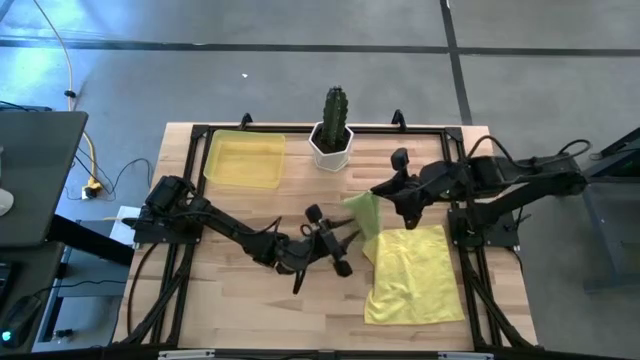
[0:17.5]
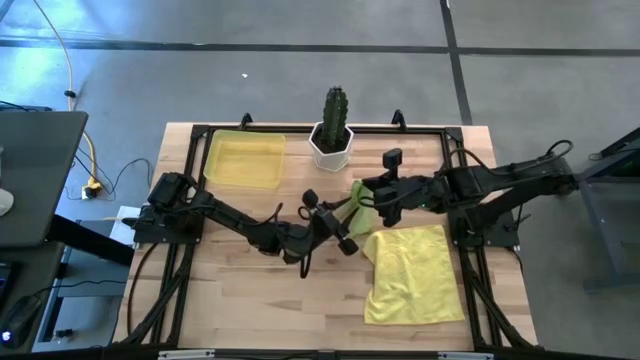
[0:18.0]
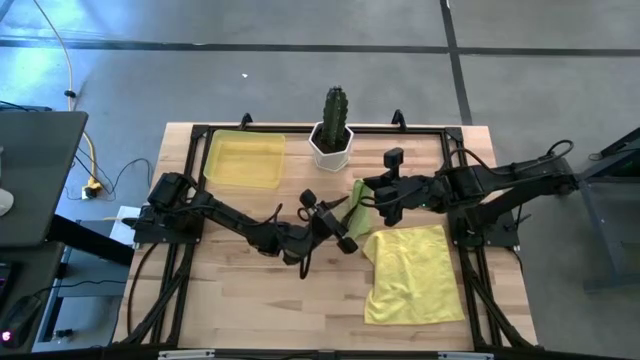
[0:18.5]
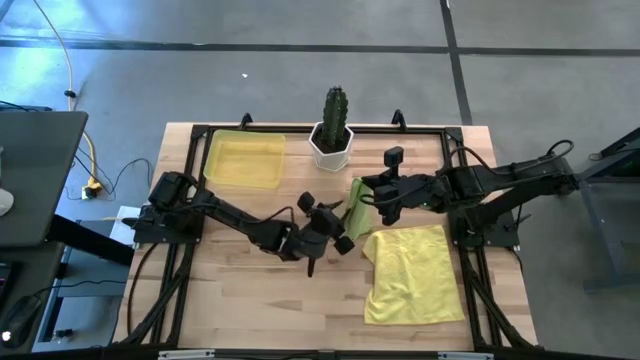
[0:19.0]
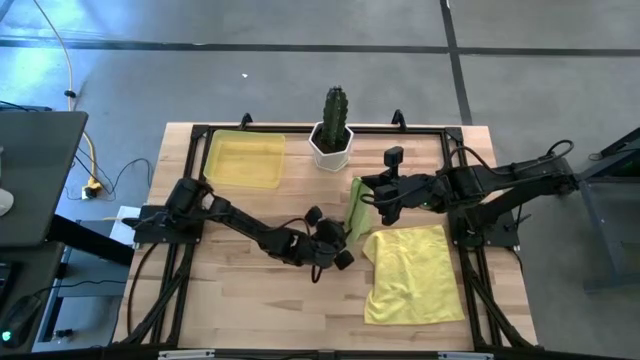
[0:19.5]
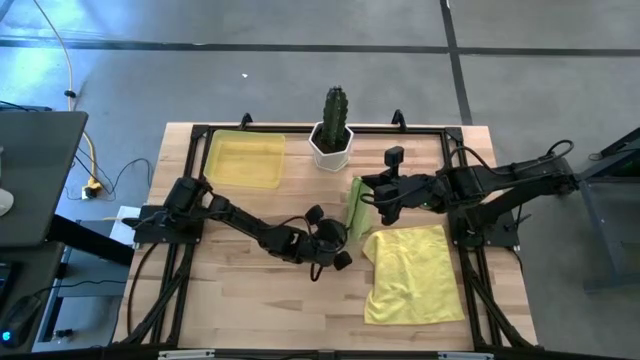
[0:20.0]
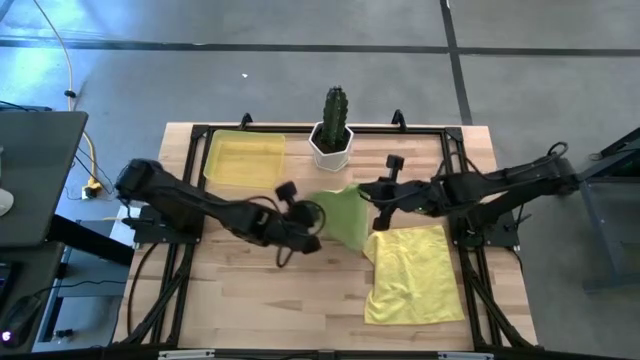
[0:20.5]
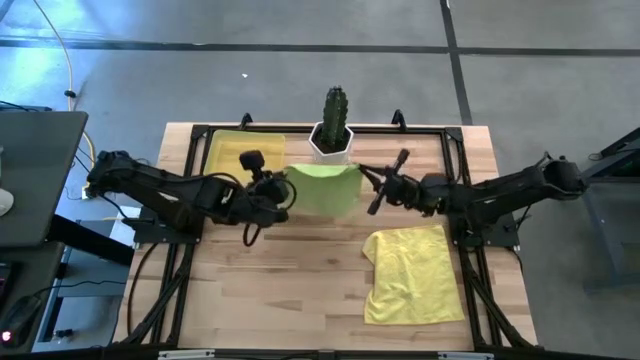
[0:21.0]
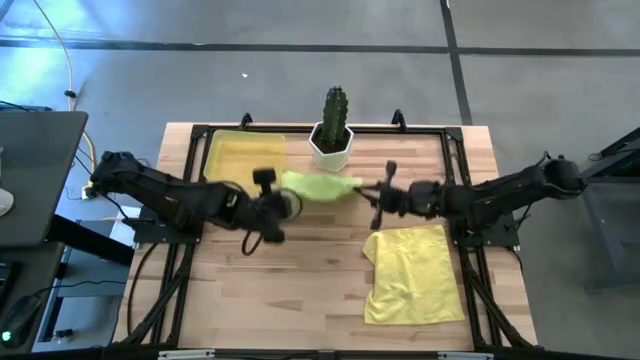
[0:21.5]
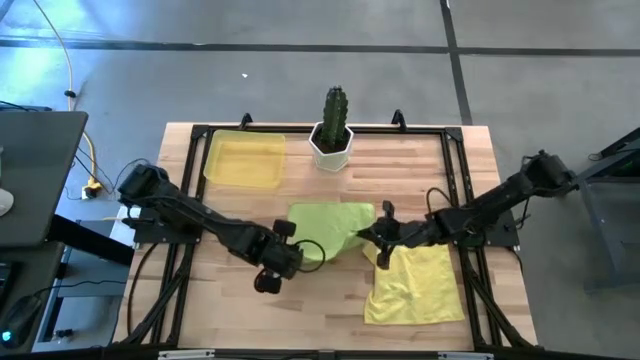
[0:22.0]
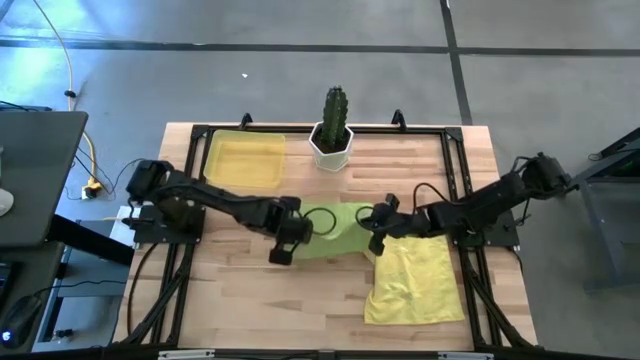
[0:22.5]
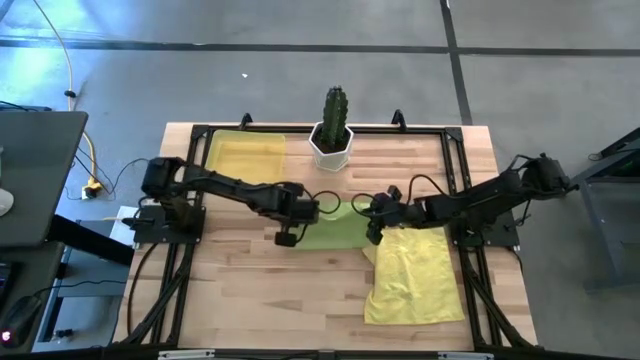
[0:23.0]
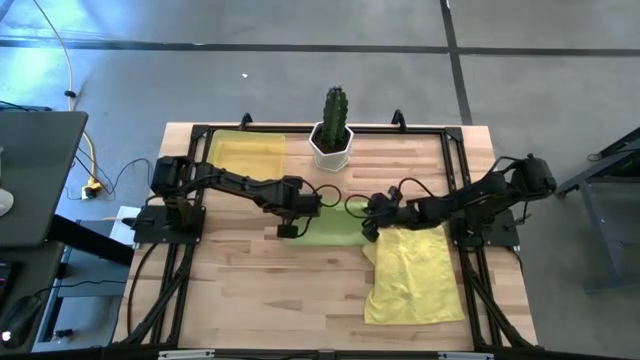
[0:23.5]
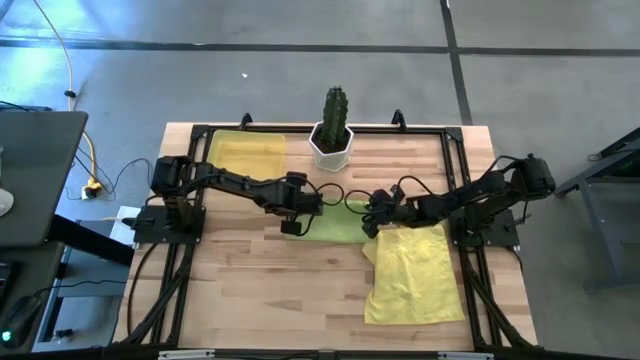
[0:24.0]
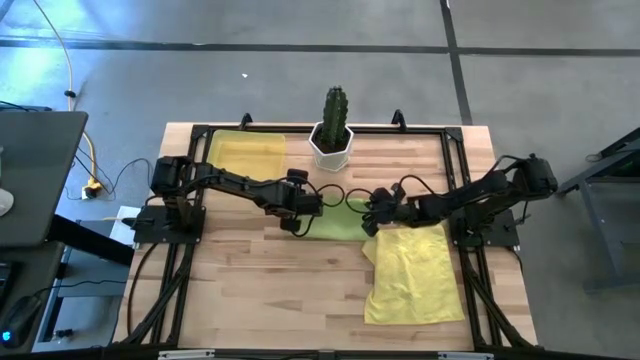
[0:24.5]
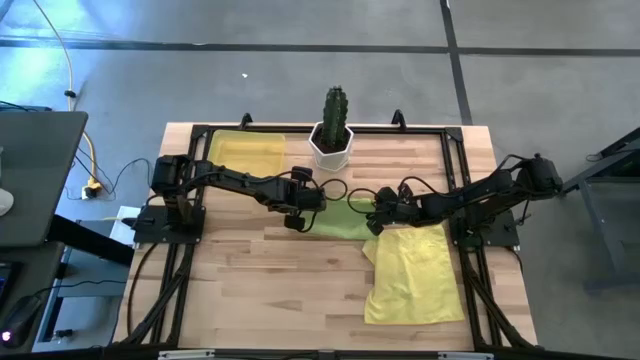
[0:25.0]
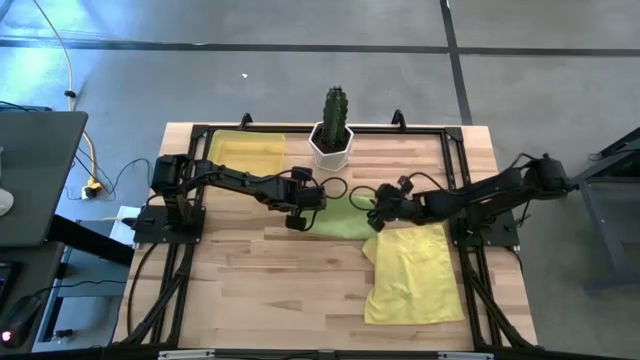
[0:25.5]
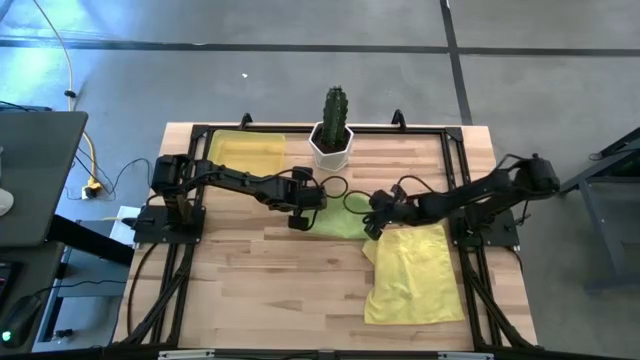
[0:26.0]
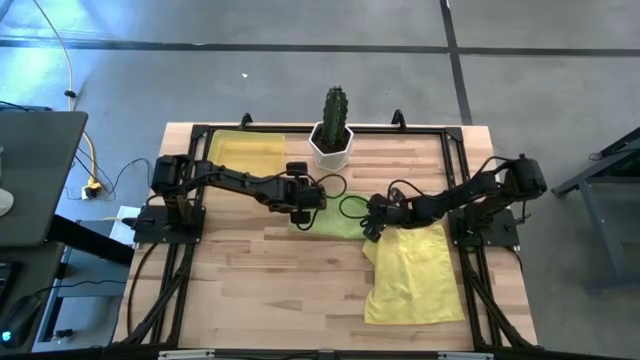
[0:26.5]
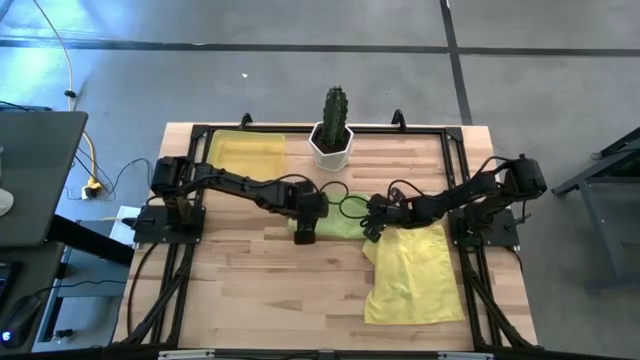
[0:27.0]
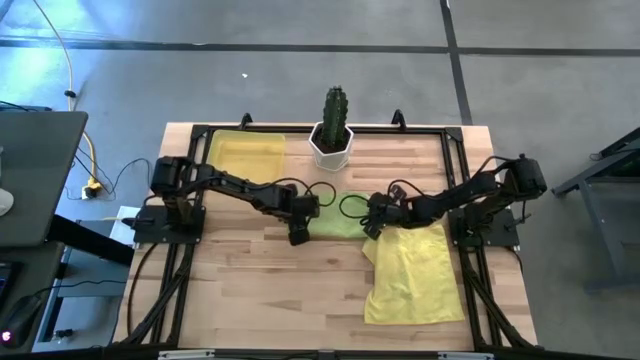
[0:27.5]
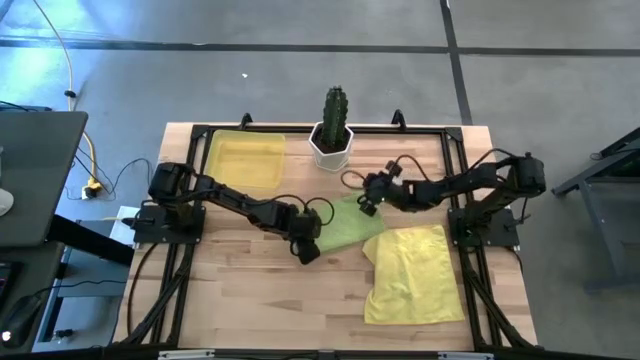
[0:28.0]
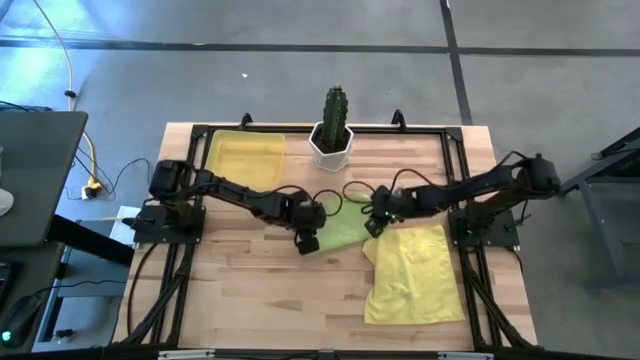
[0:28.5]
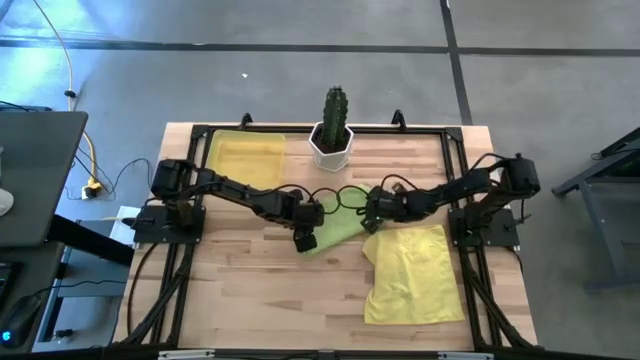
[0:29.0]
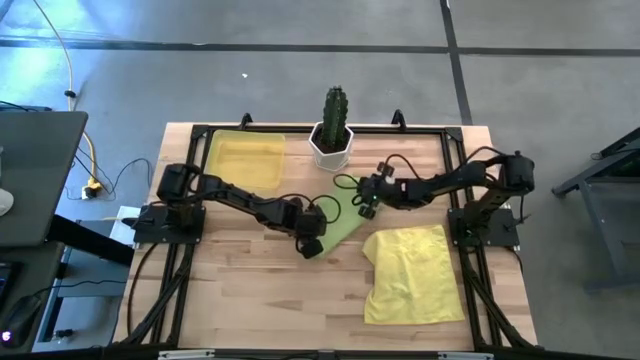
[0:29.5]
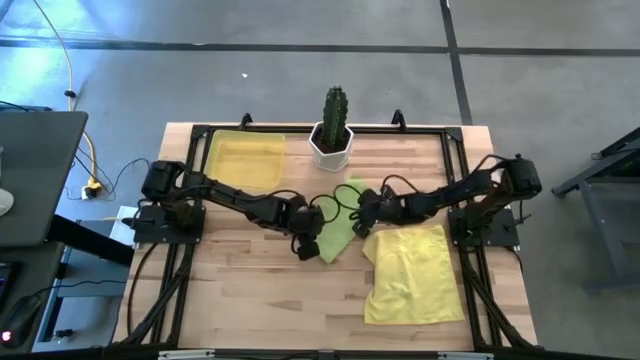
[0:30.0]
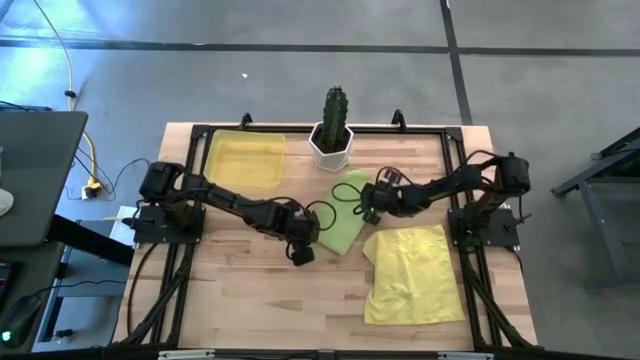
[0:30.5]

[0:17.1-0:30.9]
Task: Roll microfiber towels into tight, uniform cylinder then place into a basket
Fold the green microfiber towel

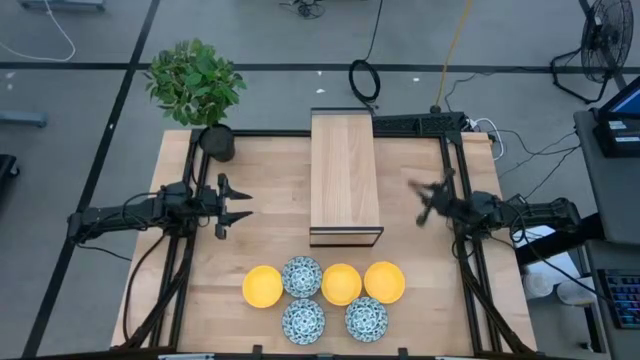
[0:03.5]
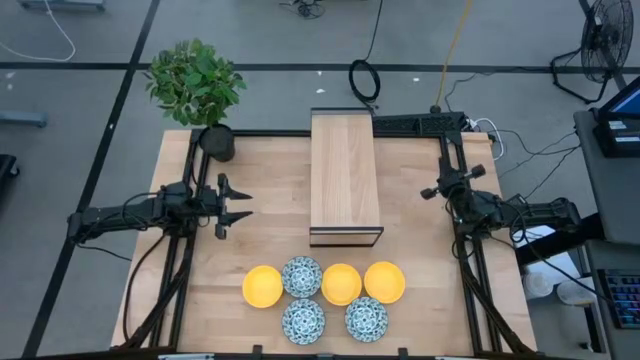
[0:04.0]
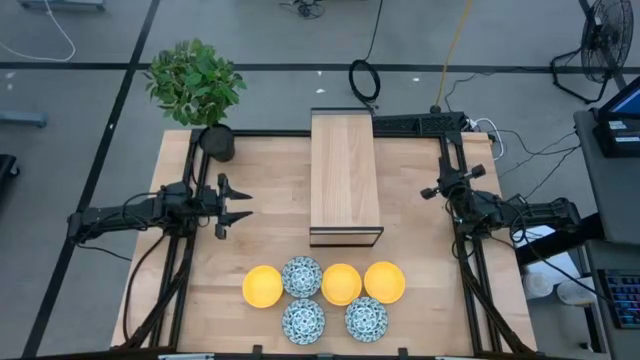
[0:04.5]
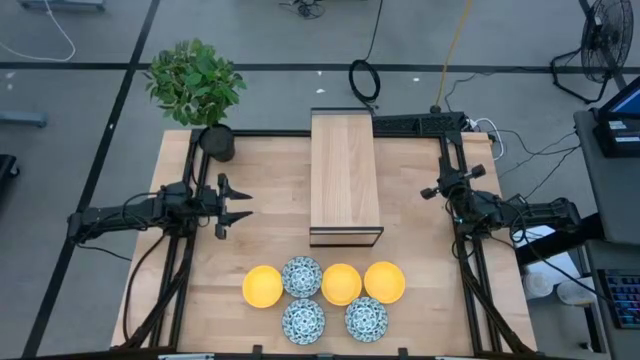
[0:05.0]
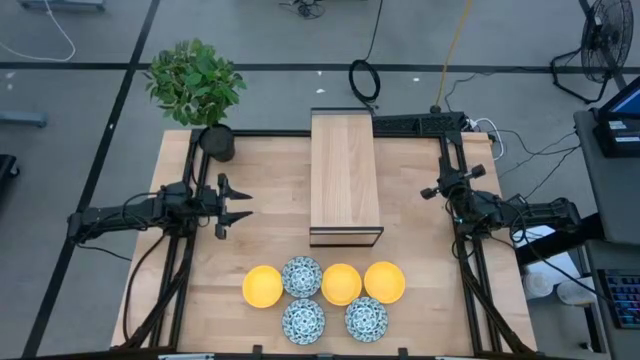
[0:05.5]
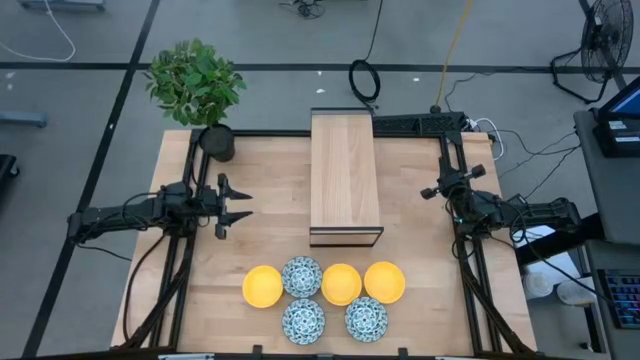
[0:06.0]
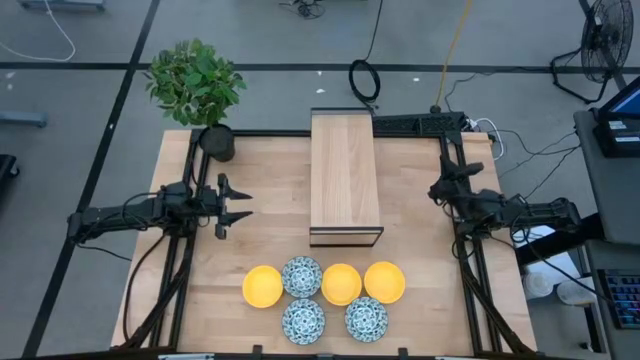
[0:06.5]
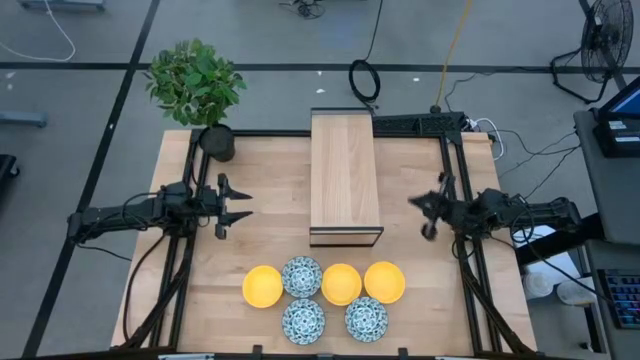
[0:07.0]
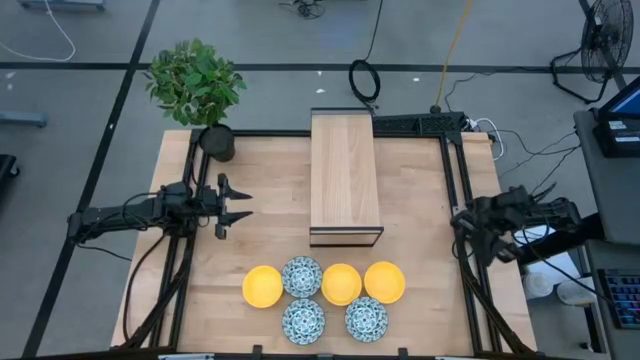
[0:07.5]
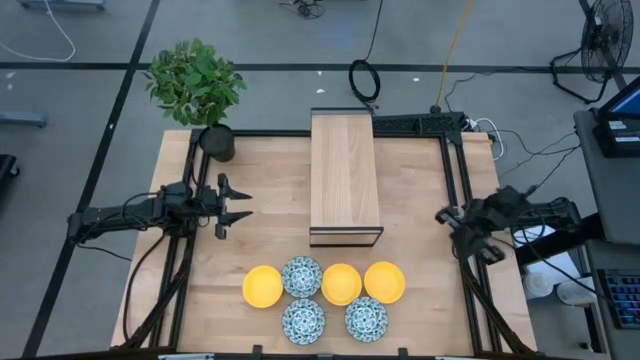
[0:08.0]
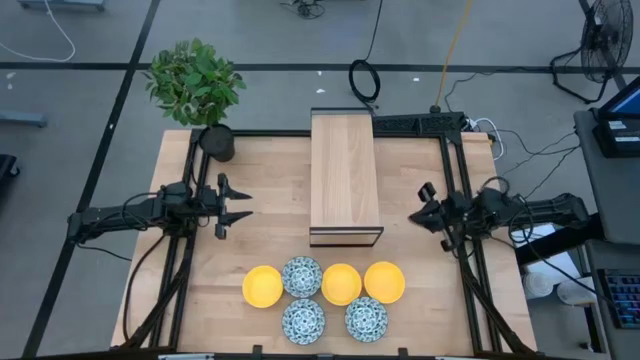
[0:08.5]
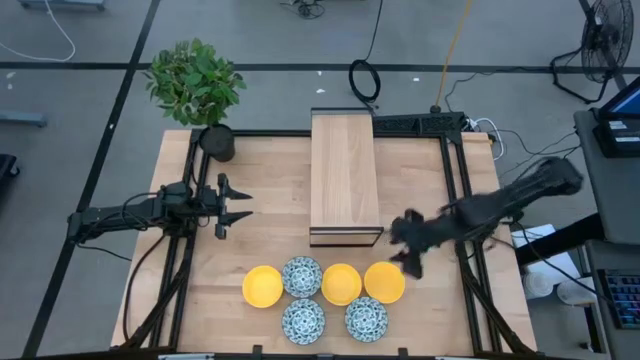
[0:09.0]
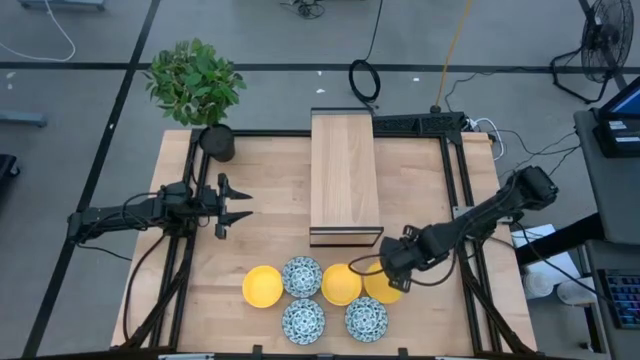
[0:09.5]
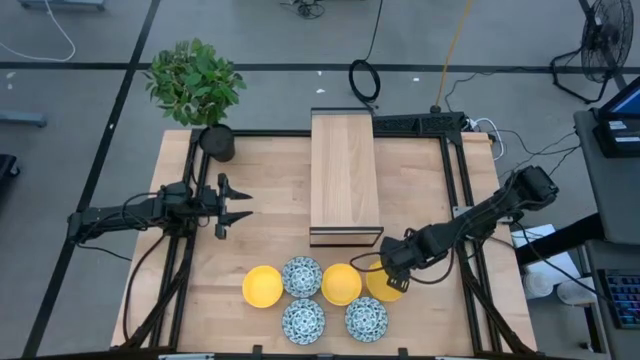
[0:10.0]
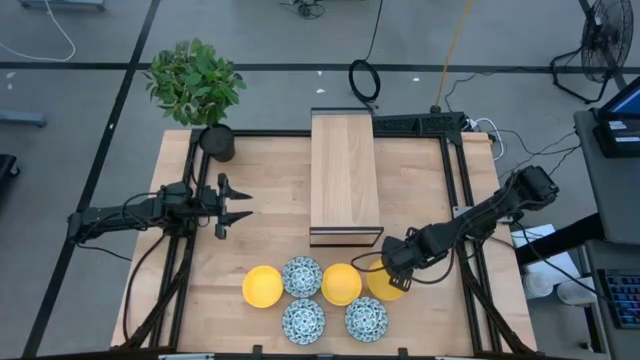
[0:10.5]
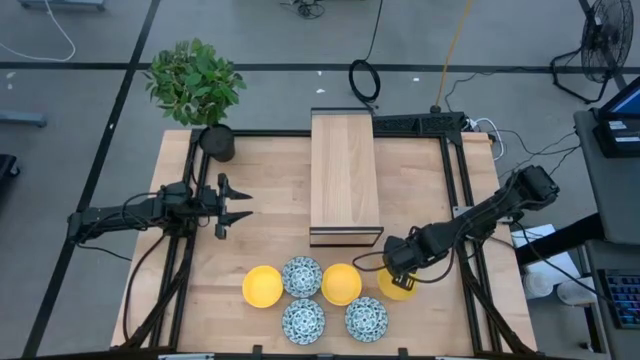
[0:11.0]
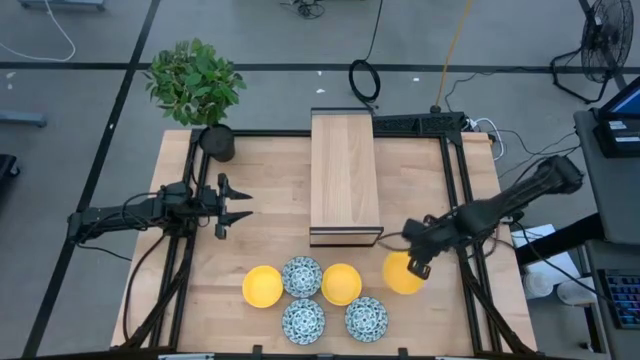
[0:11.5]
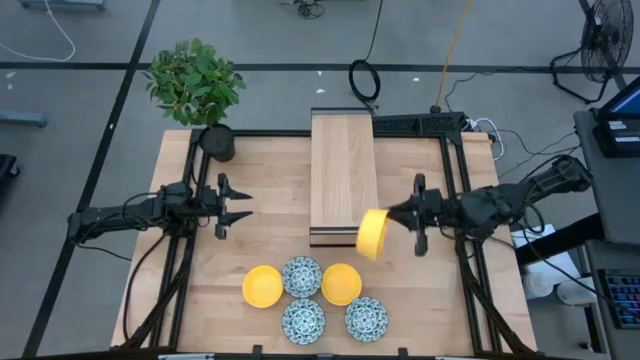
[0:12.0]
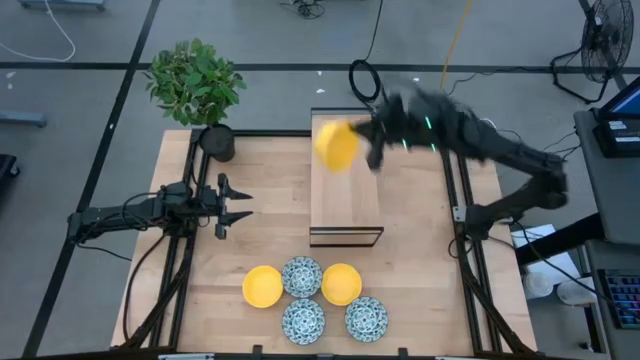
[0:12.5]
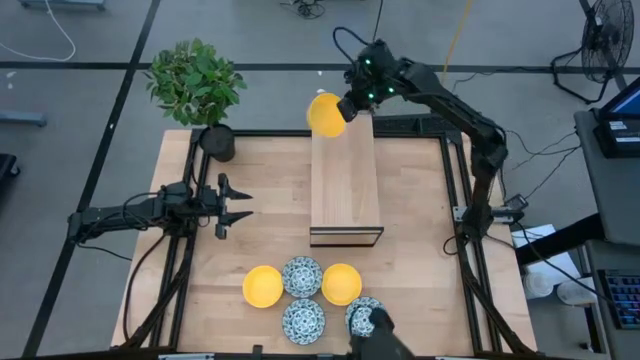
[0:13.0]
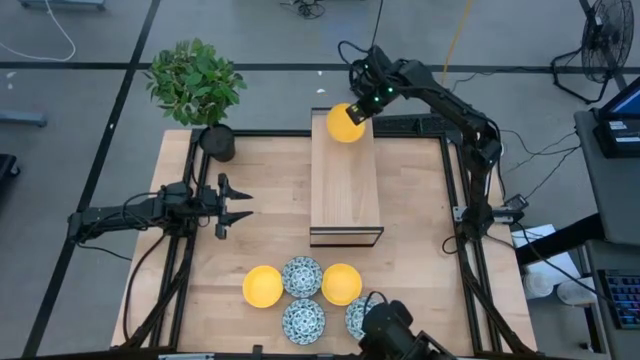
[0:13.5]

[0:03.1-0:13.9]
Task: Pick & Place Mini bowls
Put the right yellow bowl on the shelf
